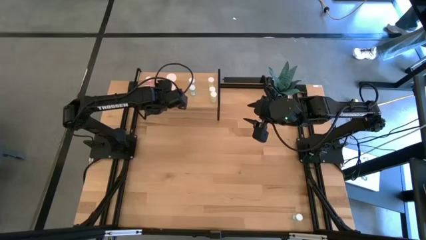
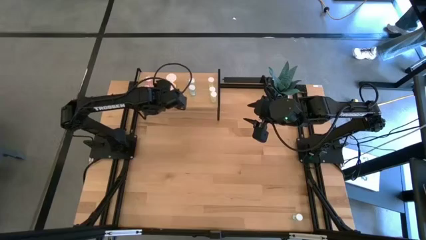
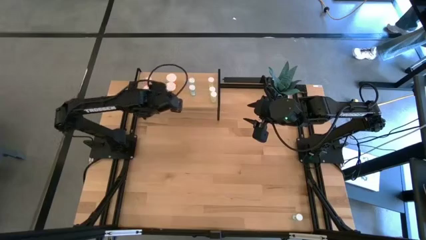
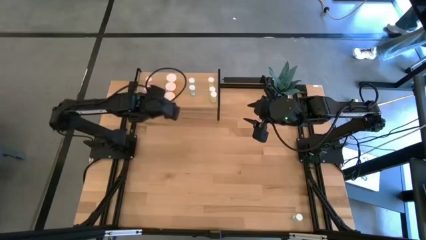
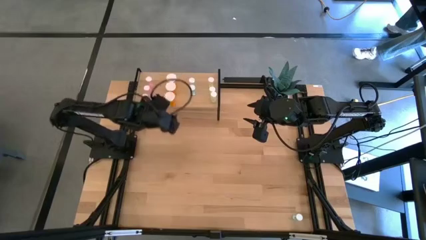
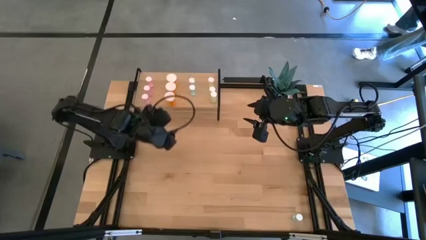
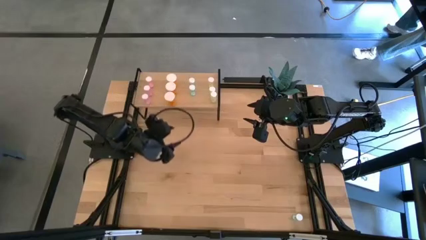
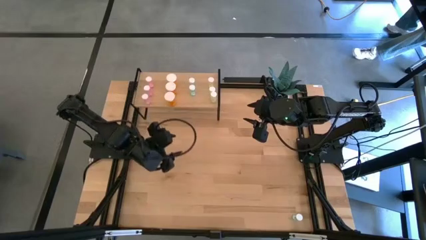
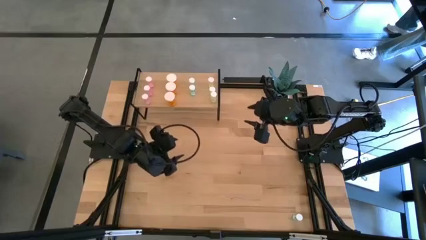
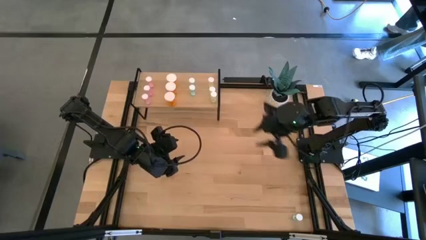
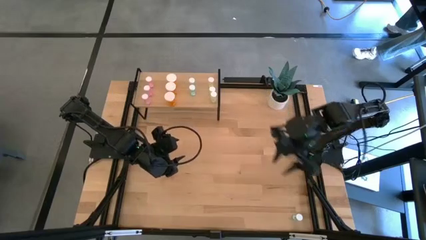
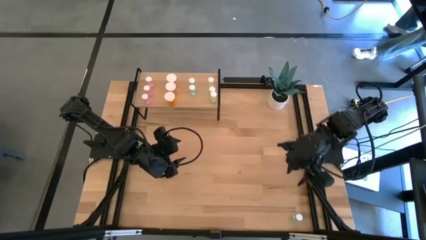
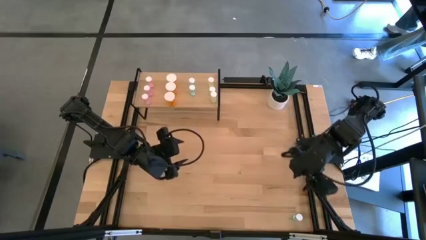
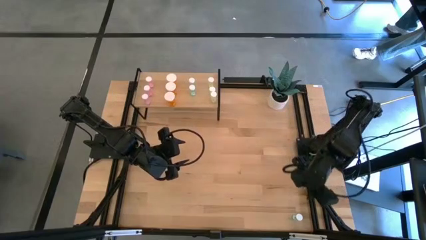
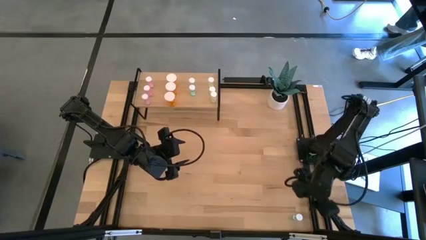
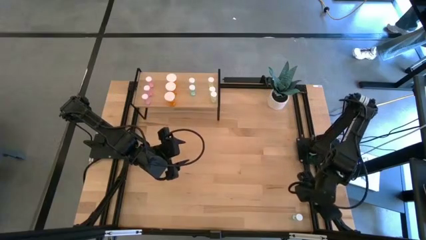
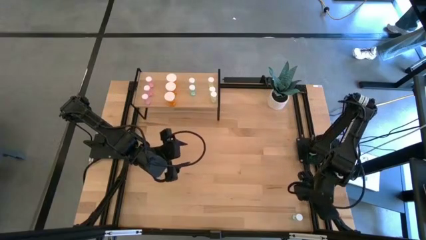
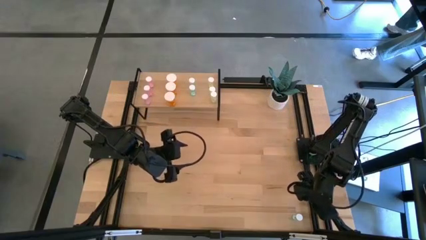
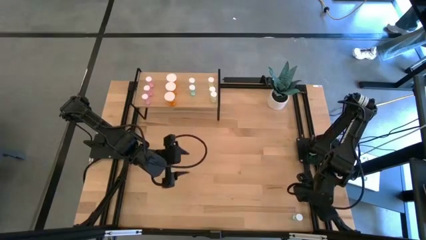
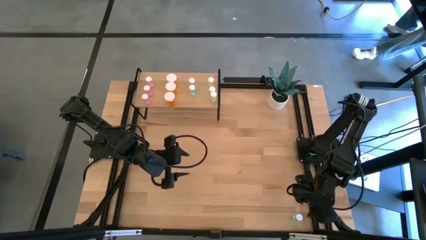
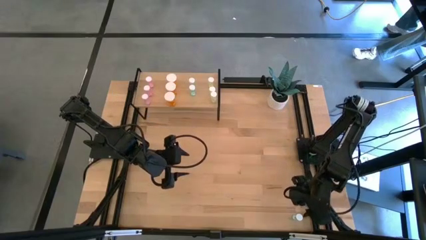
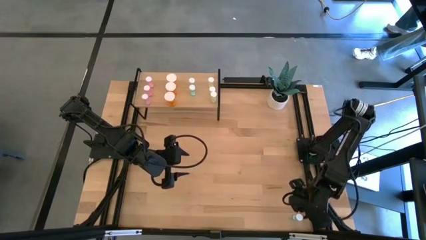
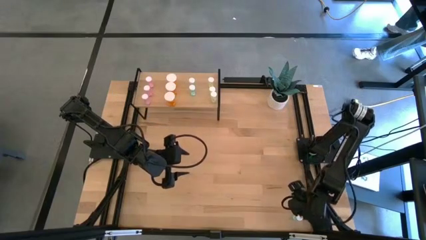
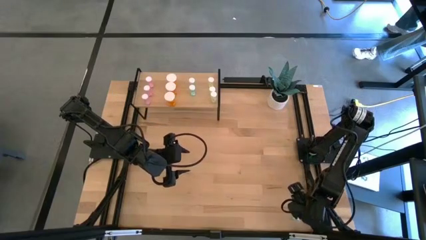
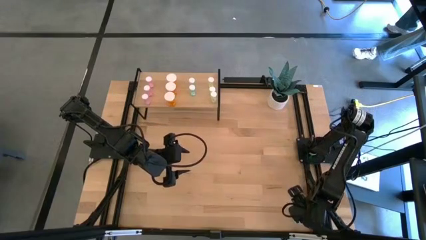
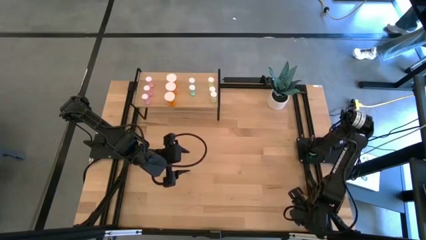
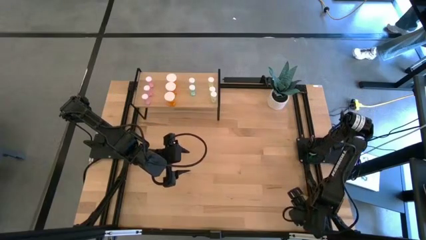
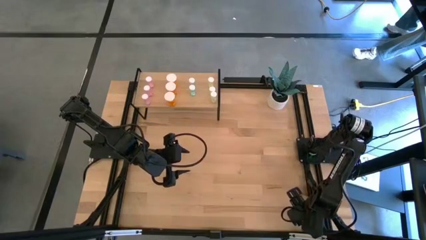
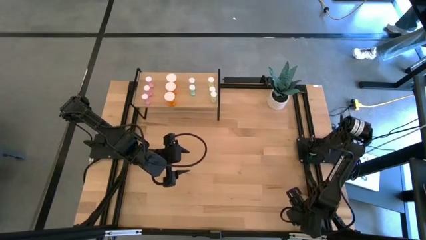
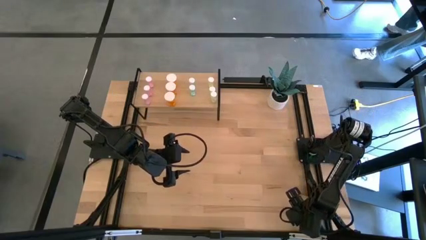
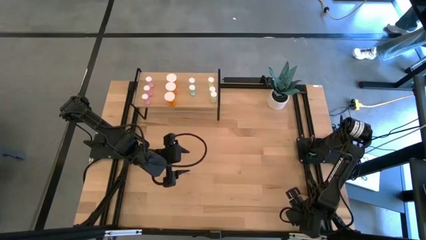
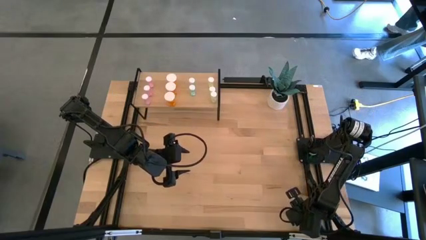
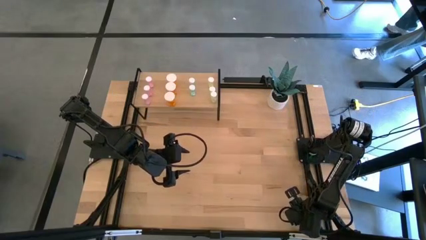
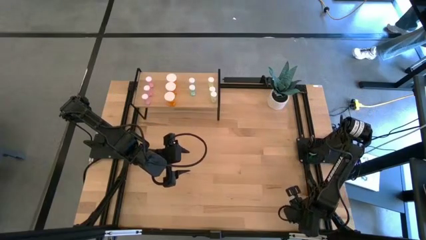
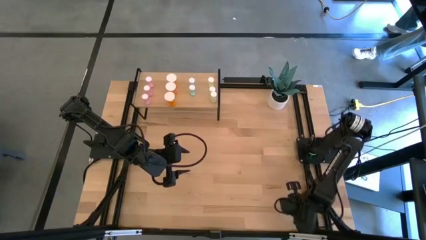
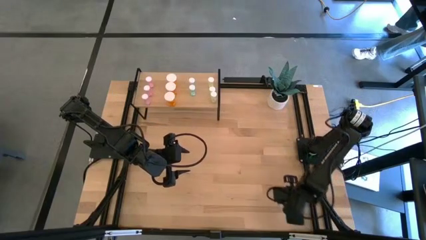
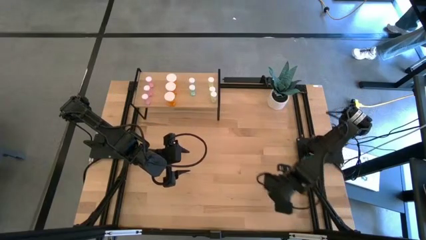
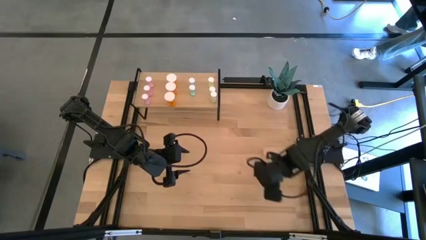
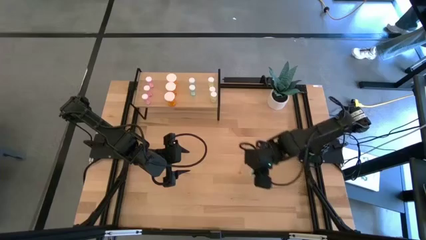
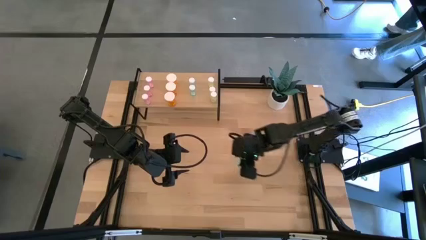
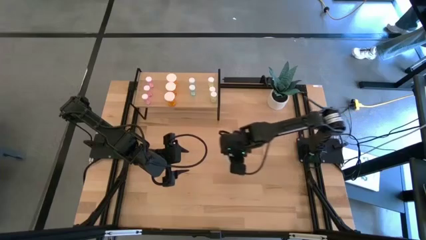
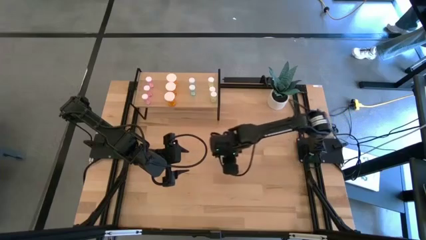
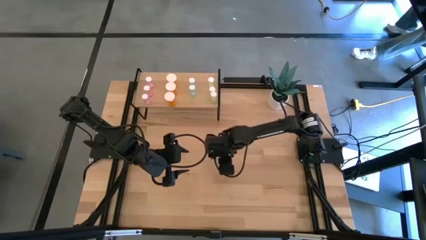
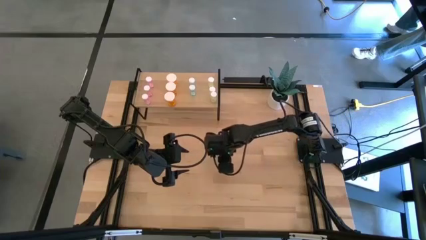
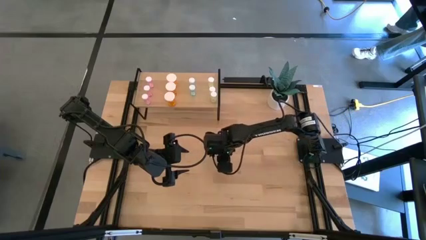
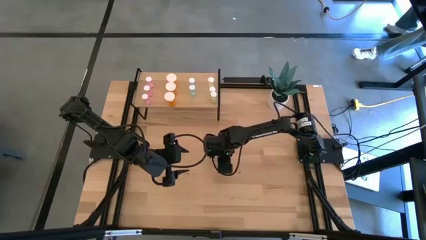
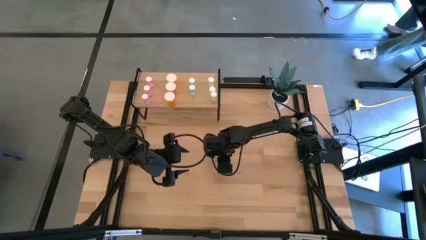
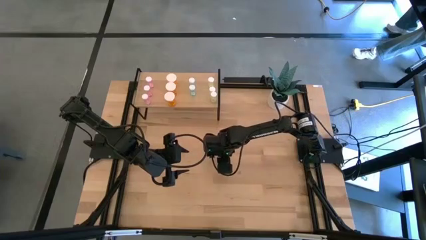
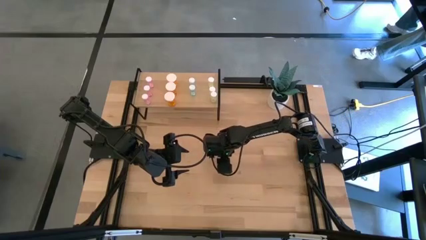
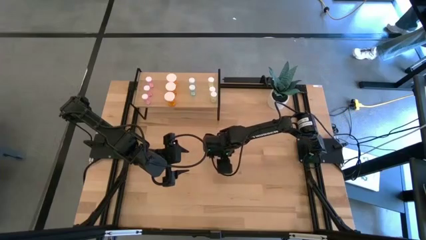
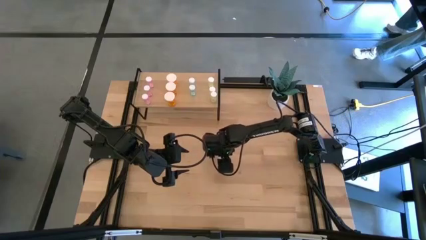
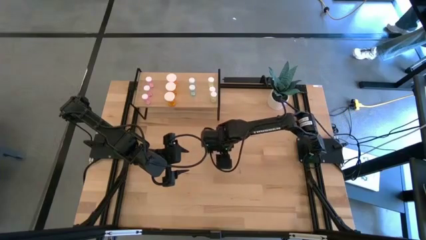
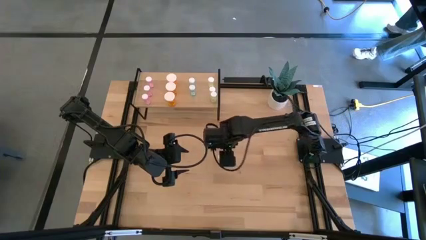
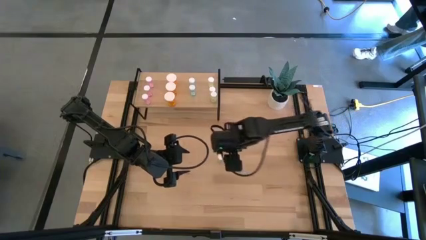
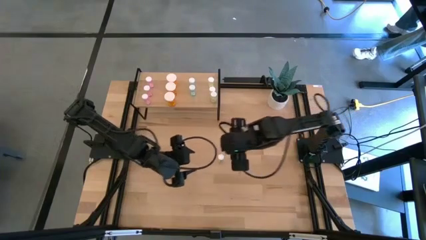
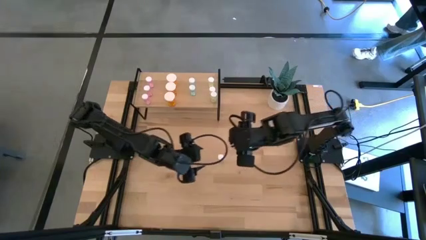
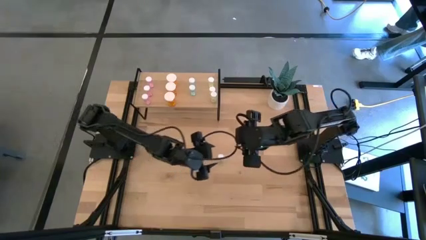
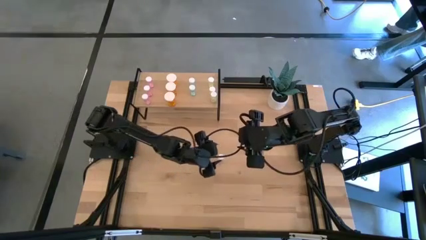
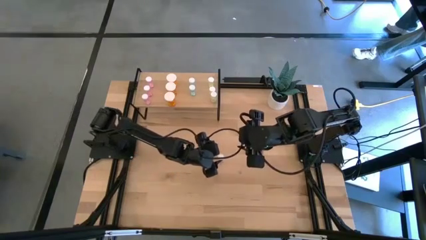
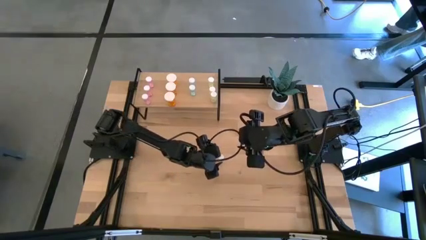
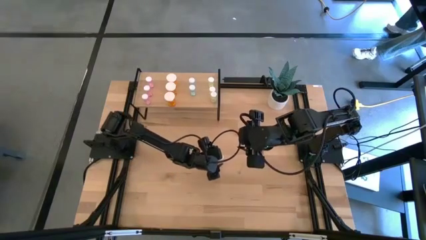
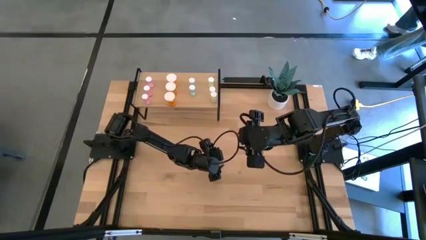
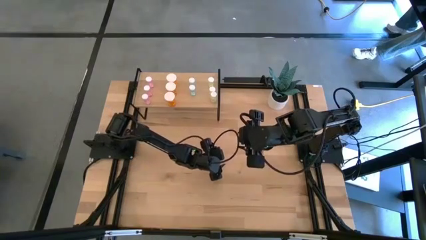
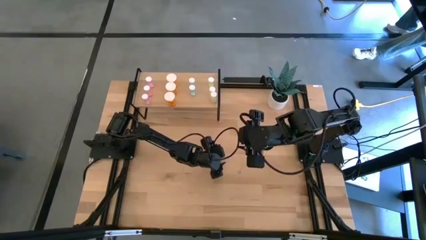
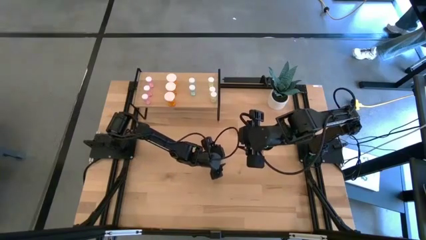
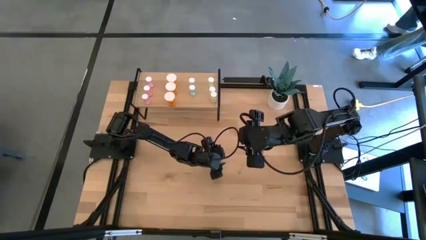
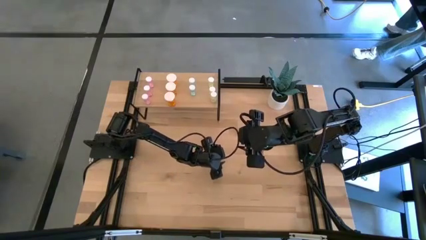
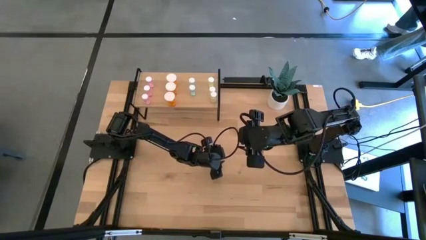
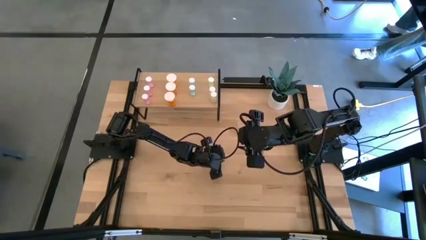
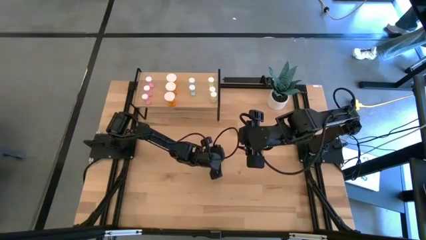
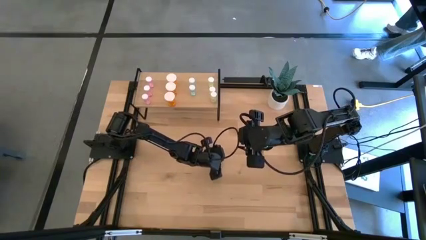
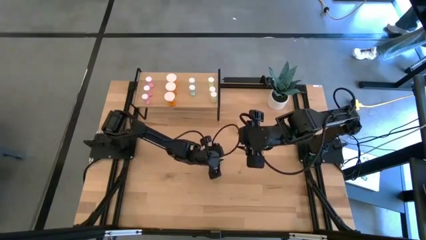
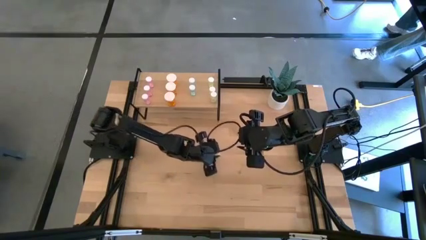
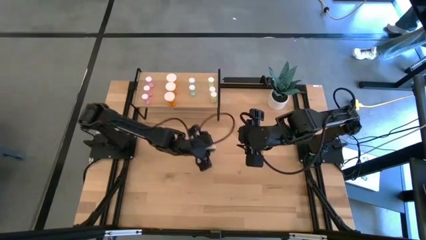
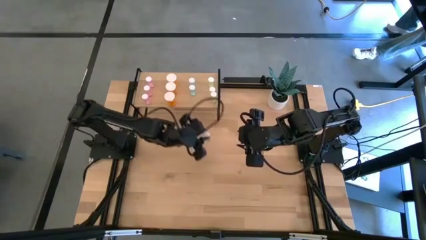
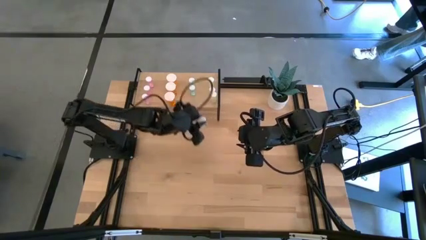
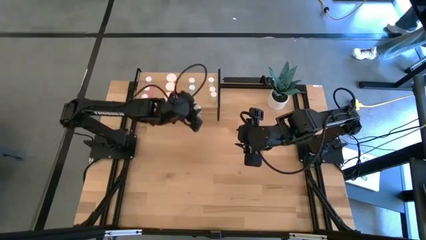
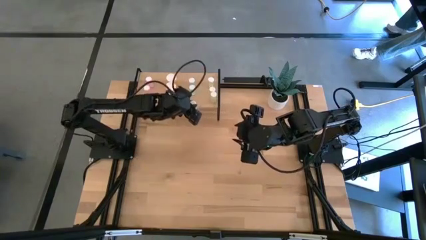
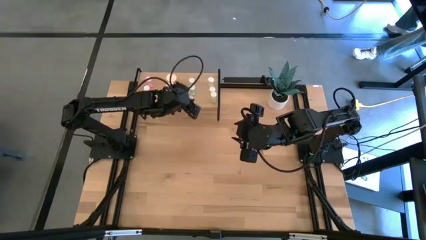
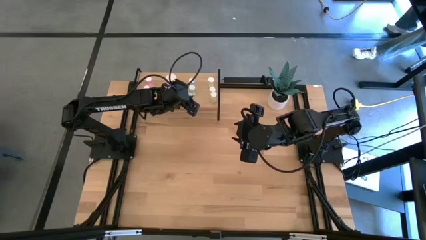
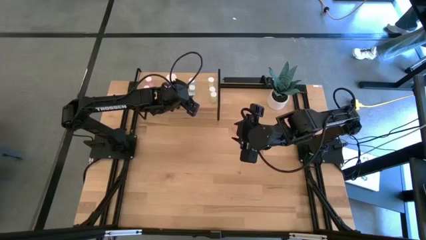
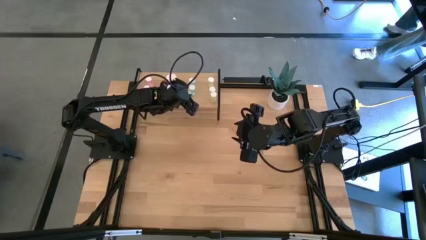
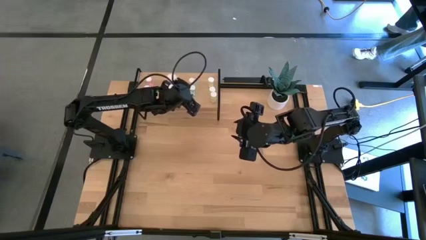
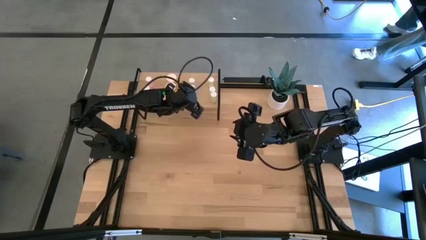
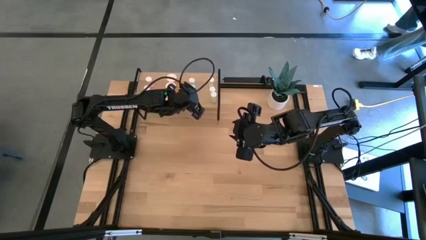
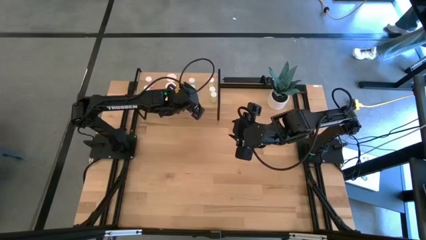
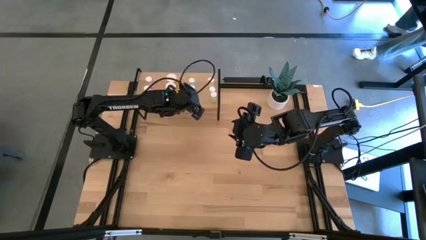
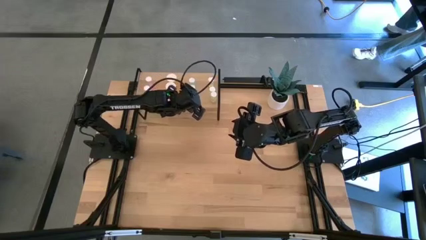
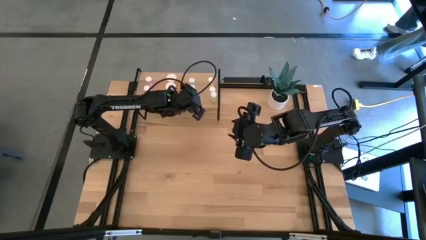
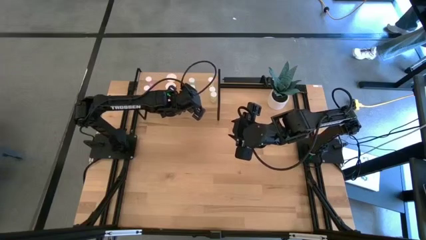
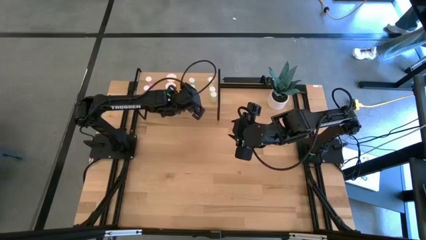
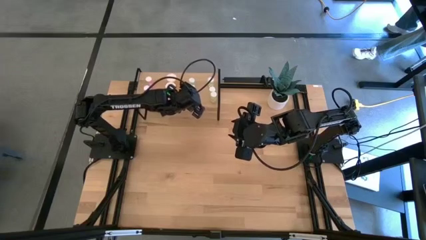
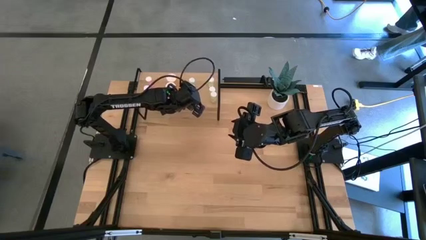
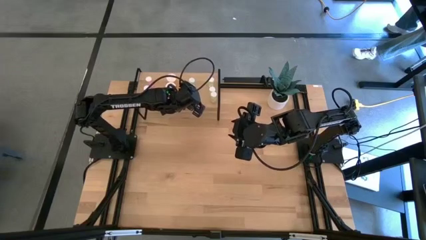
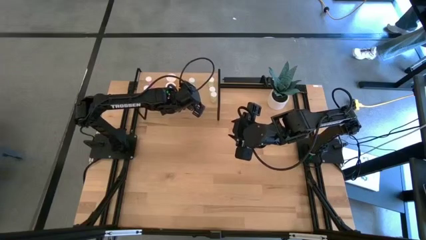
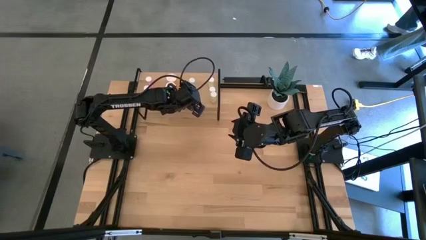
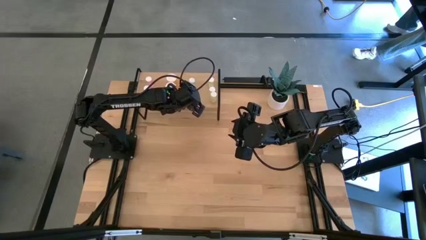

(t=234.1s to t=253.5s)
Task: Pick and place medicine bottles onto shelf by color
Put the blue pill bottle on the shelf aligned with the other blue pill bottles
